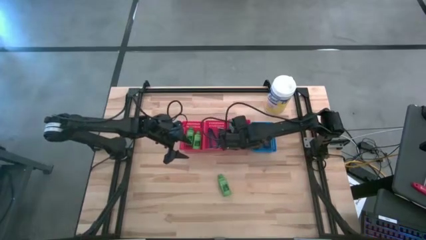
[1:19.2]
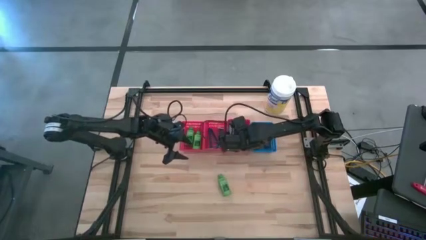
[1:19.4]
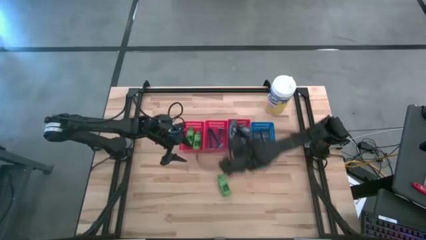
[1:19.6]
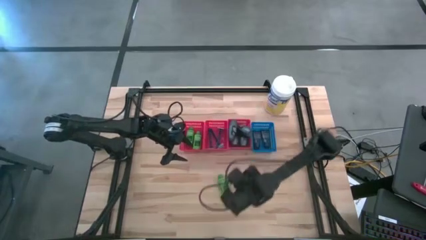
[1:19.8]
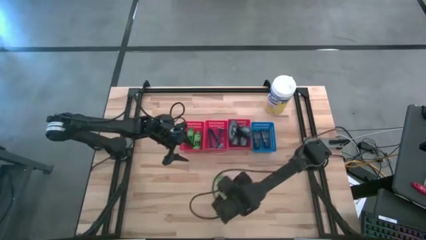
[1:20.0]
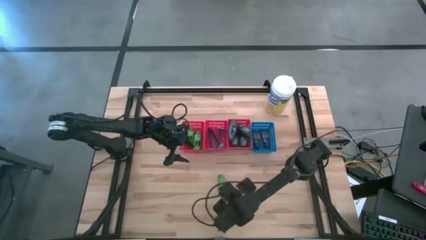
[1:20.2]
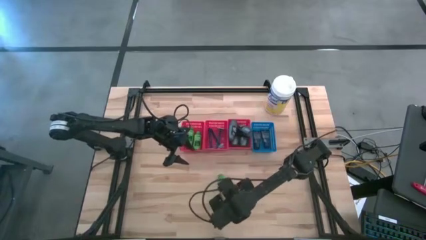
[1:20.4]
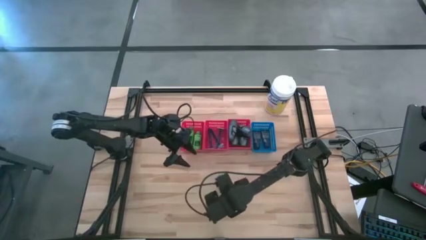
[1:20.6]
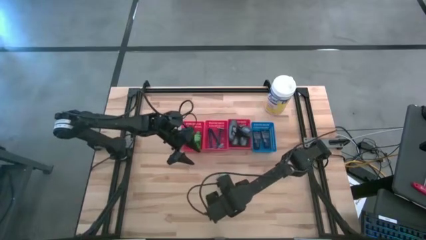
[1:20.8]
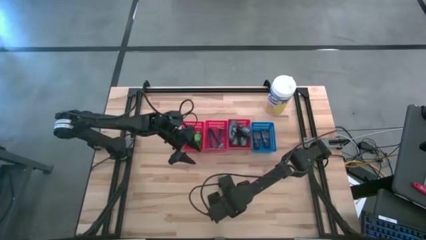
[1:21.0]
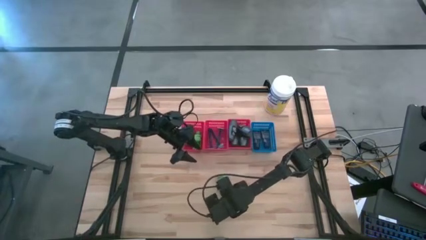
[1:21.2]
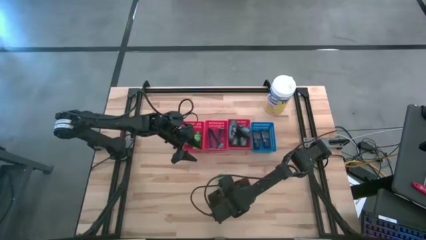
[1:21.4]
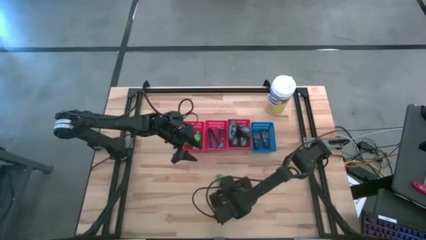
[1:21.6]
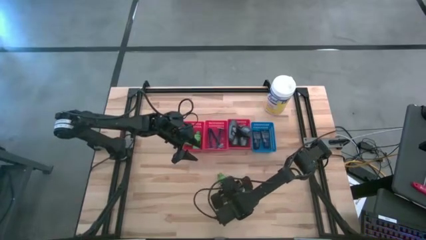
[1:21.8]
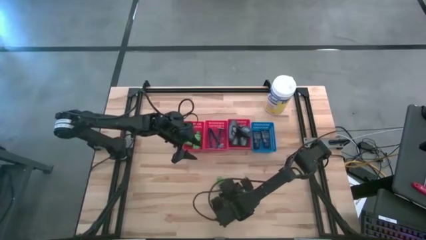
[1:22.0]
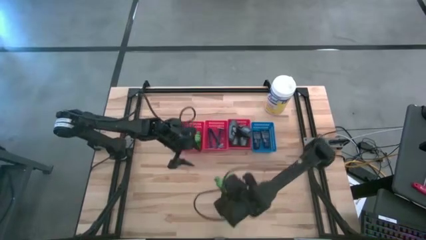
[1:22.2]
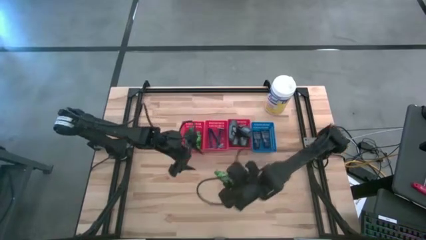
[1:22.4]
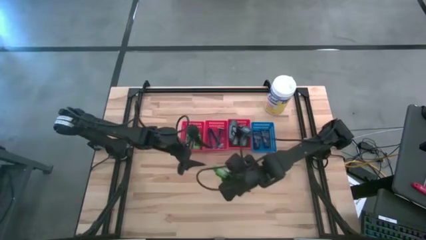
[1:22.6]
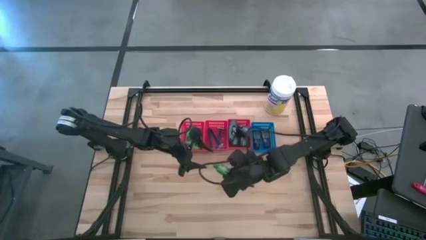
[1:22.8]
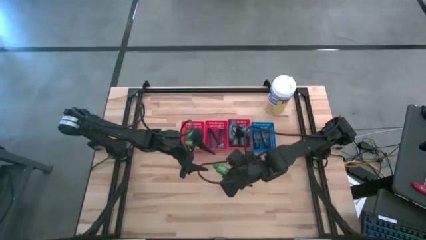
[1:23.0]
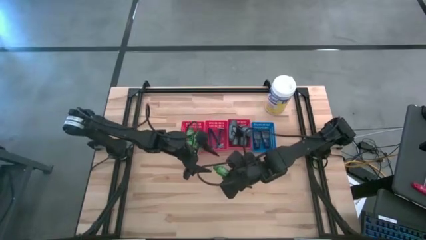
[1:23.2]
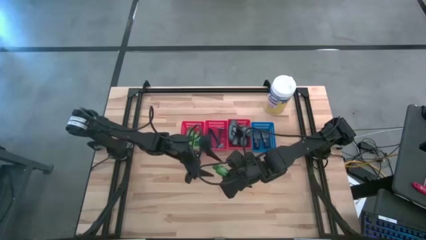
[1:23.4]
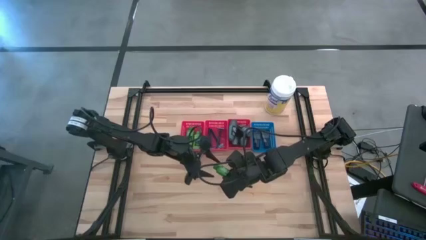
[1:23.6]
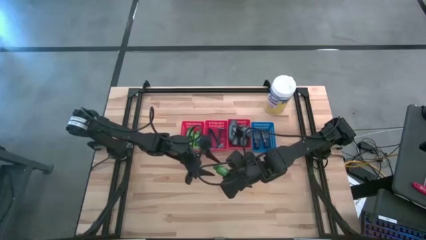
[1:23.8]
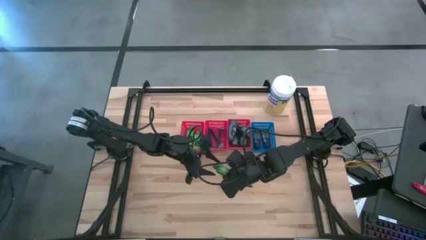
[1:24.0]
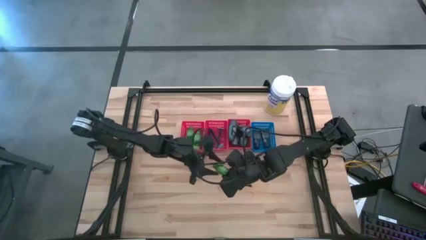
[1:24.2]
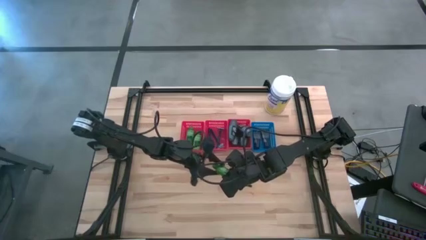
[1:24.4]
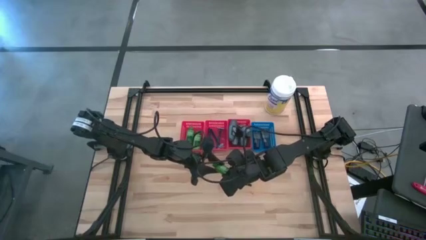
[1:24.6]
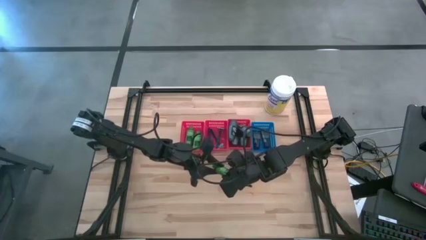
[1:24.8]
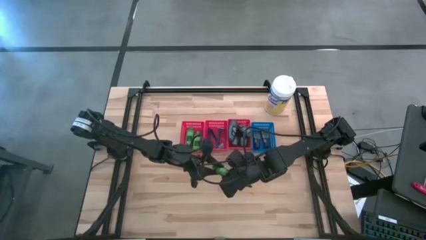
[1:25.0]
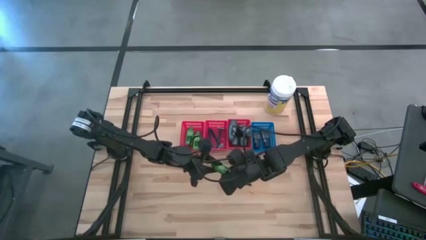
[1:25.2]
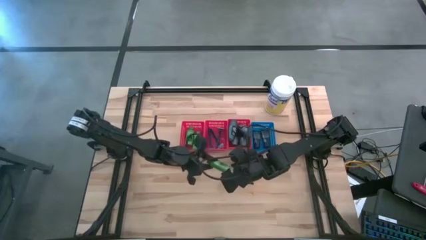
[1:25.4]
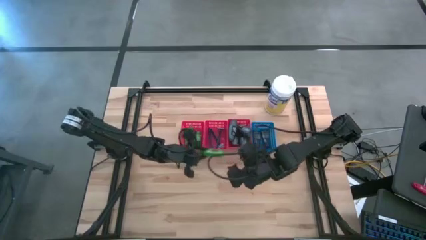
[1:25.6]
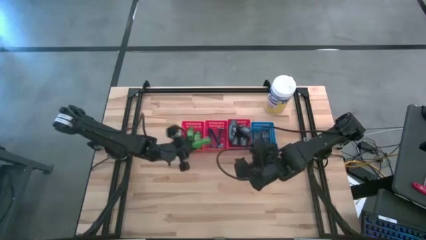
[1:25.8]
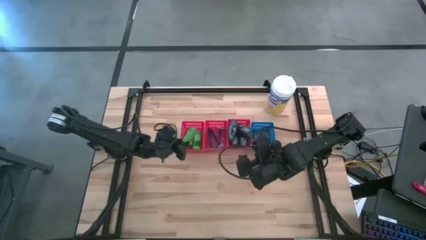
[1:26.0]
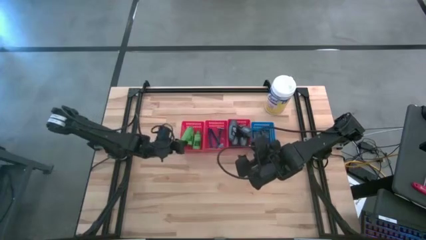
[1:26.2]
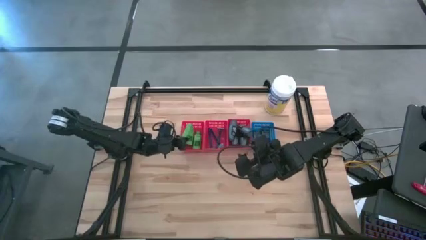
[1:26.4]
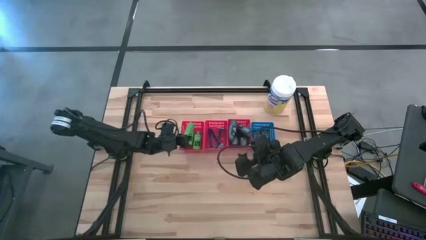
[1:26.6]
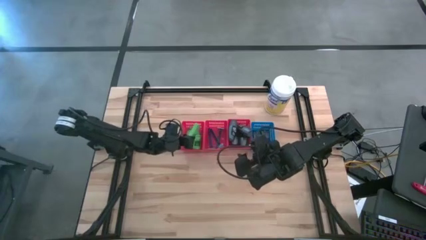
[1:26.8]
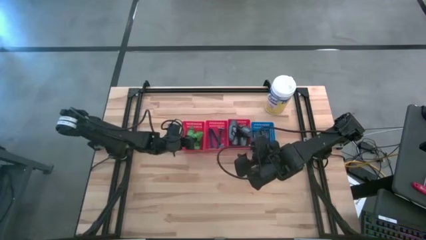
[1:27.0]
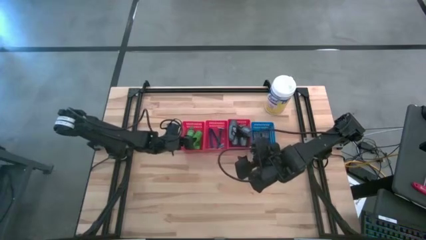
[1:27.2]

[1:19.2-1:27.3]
Task: Pick & Place Travel size toiletries
Put the green shampoo bottle into the left red bin

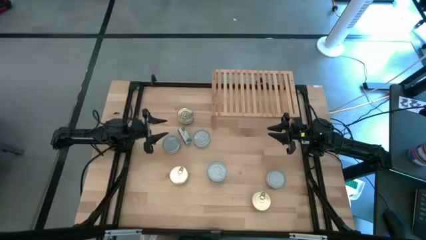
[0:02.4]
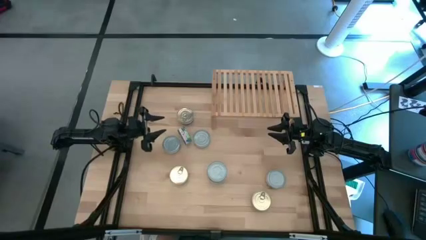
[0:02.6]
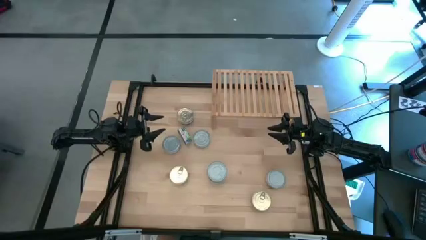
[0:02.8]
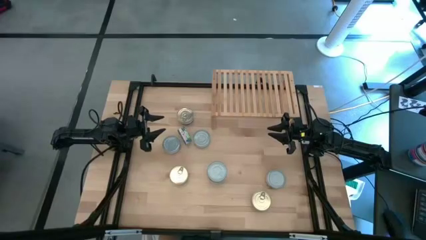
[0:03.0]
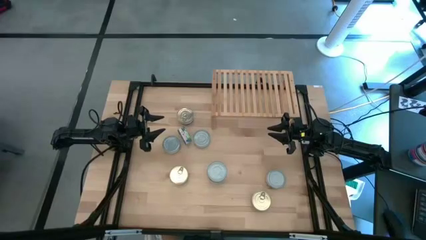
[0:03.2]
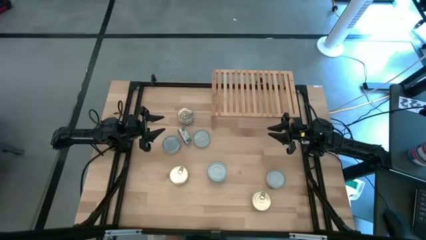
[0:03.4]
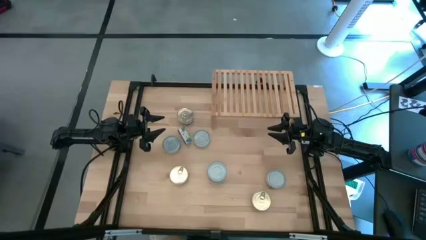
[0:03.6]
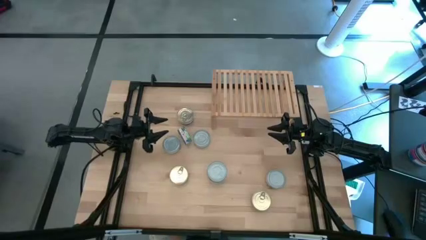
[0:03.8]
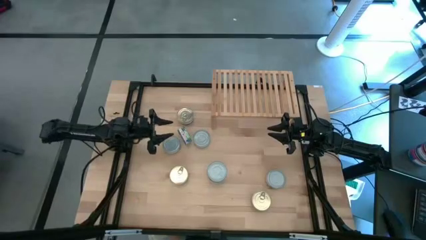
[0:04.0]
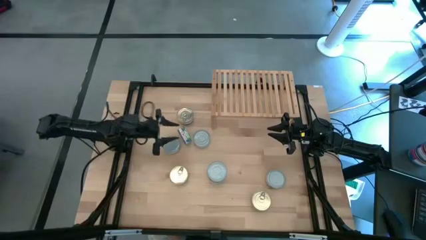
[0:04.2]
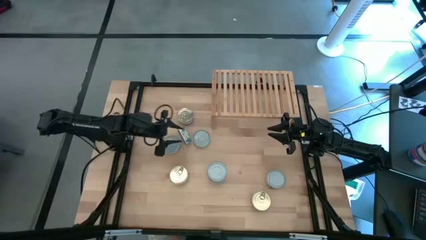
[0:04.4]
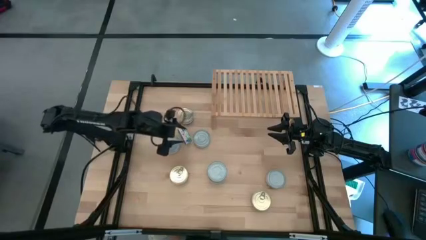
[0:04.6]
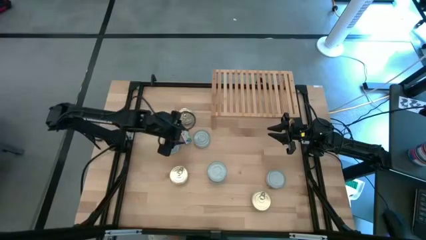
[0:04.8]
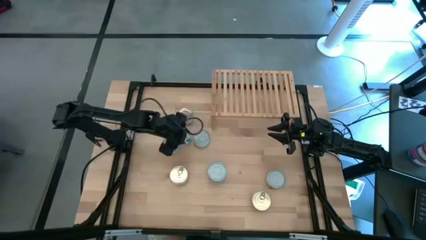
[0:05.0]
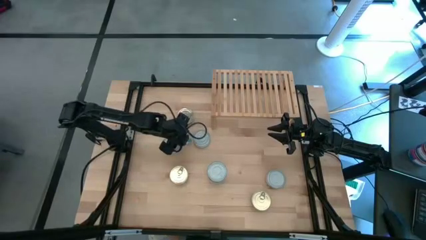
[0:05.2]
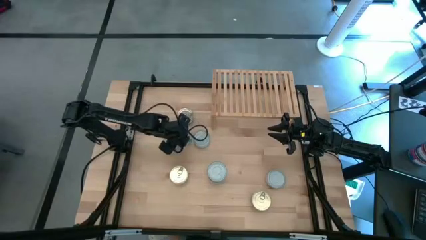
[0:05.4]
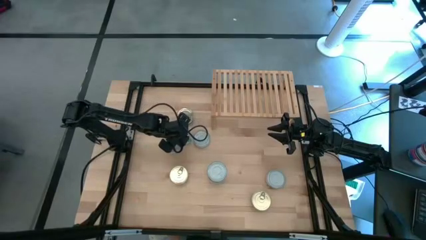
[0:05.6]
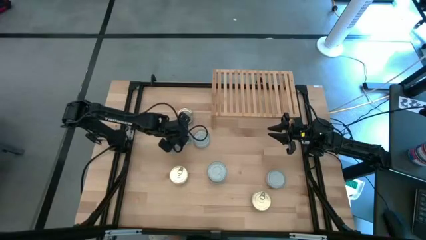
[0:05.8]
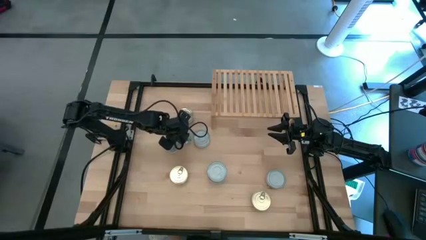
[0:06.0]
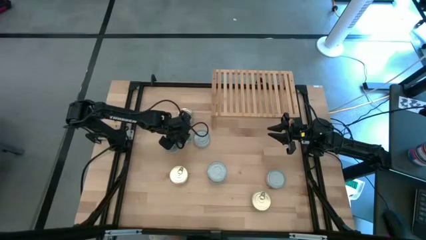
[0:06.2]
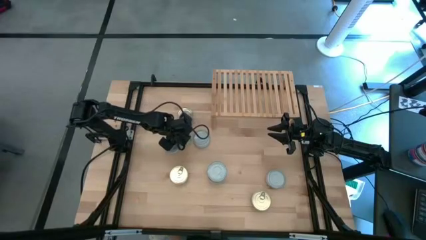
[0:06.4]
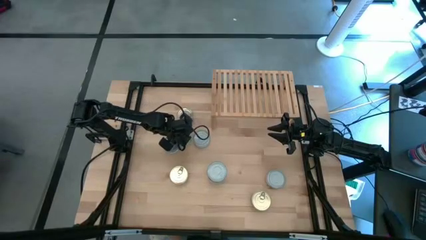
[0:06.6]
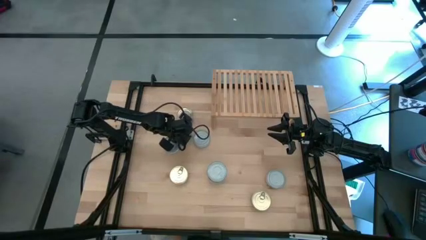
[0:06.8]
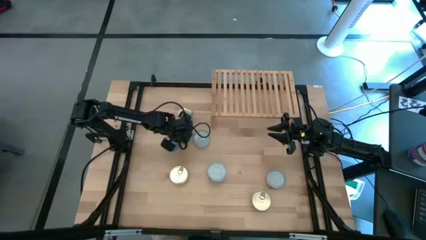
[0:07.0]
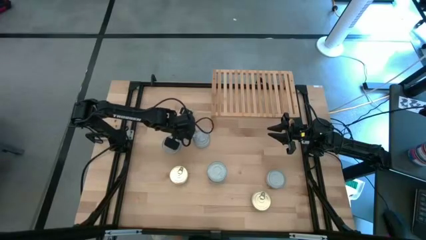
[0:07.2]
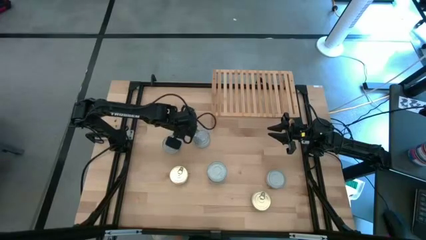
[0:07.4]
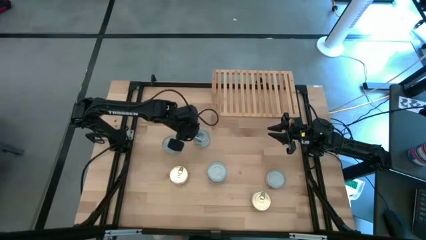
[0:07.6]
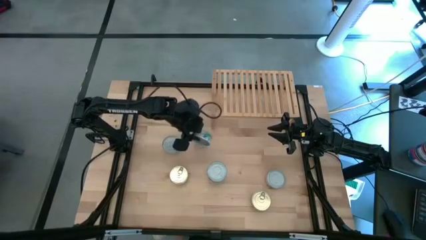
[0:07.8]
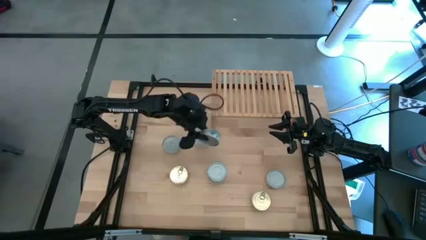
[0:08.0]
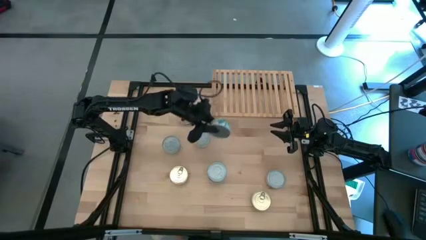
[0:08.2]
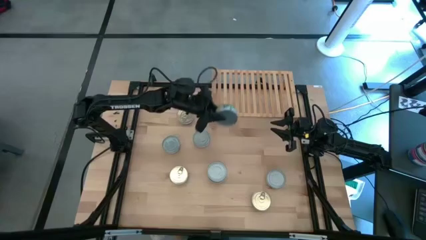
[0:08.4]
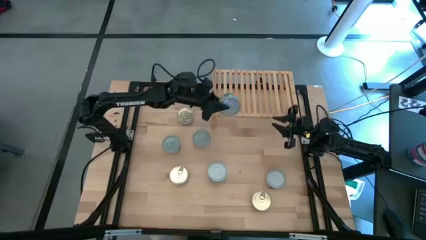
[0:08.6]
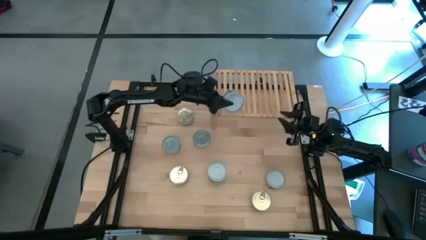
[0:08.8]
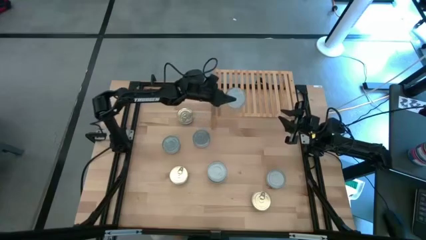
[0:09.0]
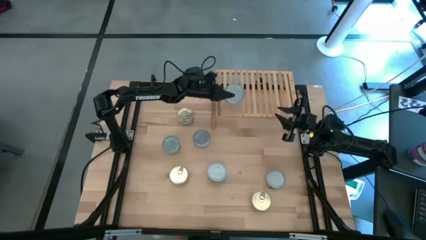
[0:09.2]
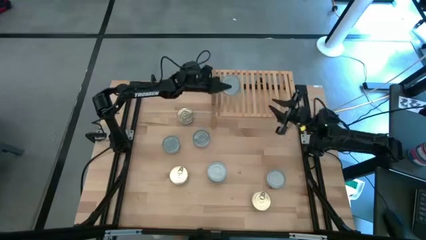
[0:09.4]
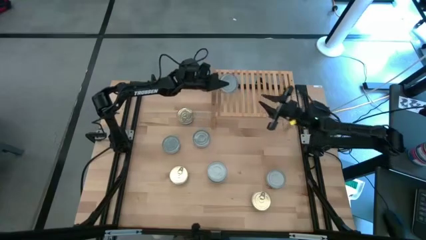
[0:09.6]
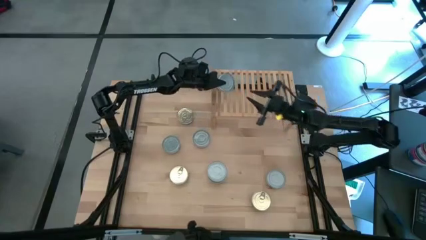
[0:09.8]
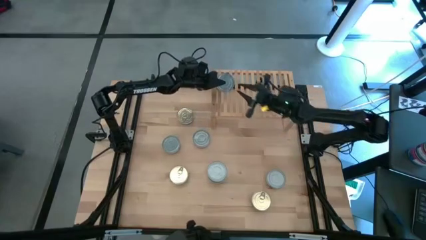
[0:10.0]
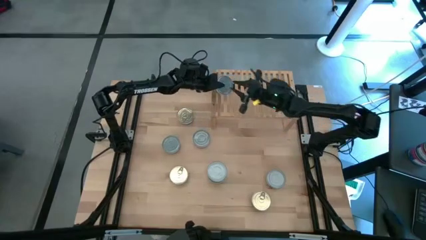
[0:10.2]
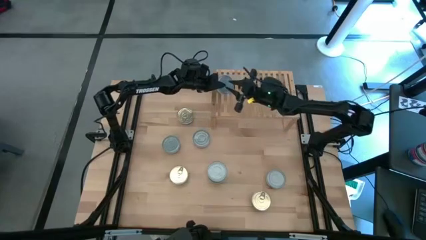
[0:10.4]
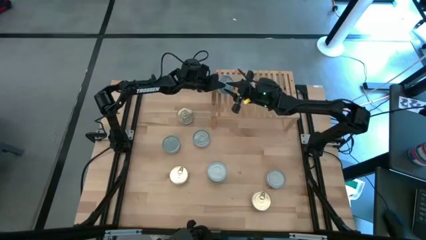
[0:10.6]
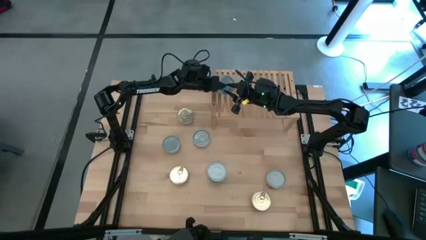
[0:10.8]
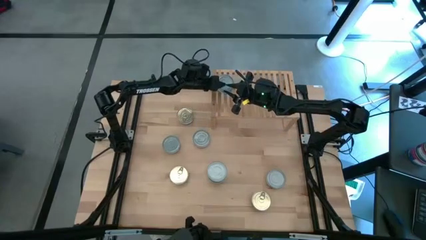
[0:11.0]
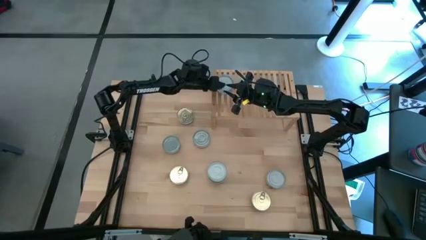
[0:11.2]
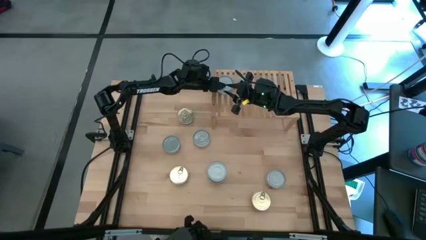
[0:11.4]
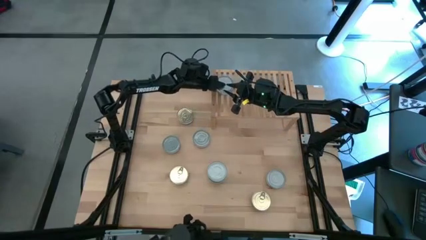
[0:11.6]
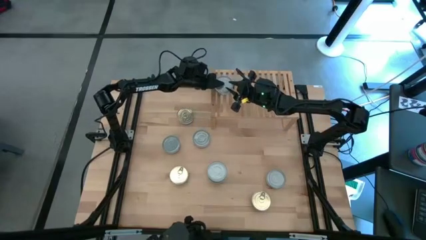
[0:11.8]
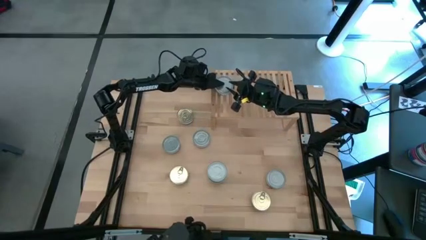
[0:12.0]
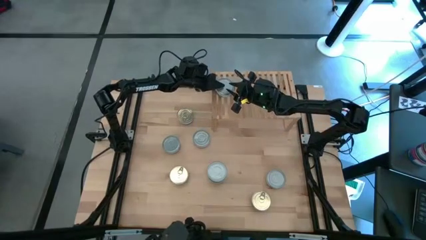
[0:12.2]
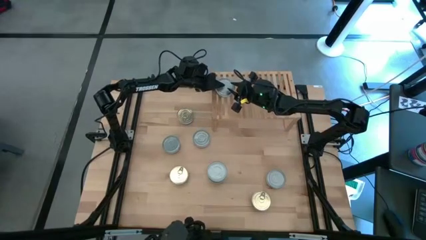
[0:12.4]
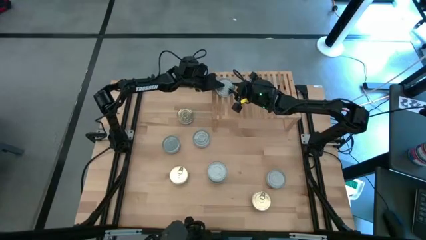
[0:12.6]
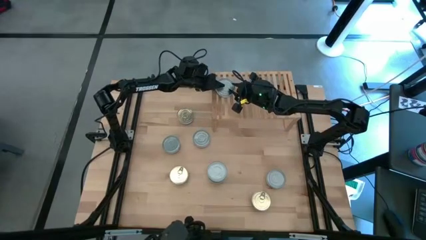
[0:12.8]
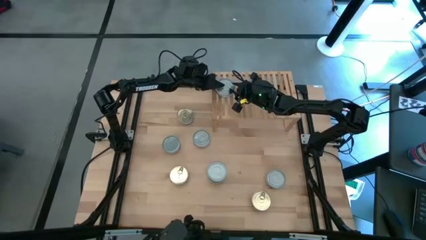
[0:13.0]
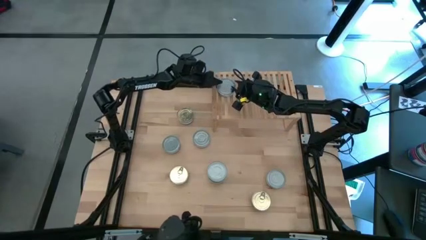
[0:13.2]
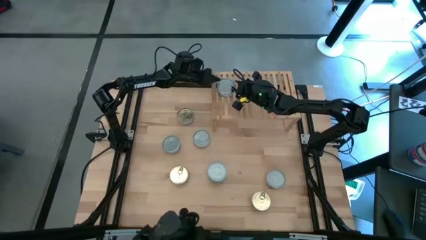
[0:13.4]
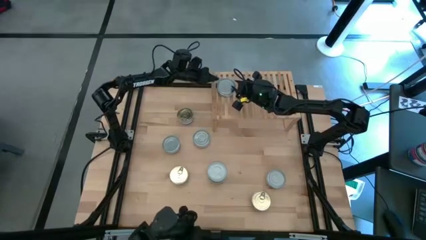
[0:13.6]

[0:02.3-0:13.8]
Task: Stack canned seafood by type on shelf
Put the green tuna can on the shelf
